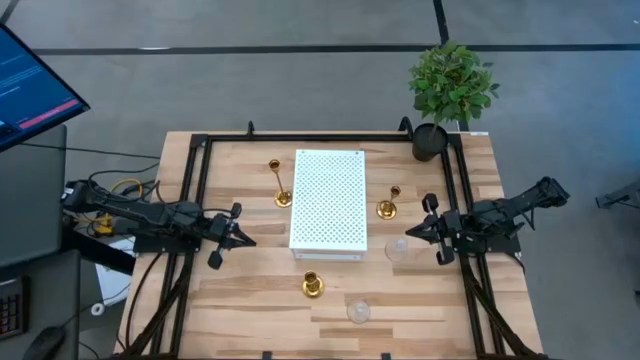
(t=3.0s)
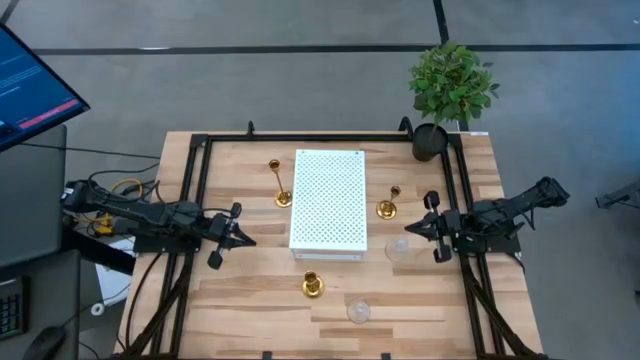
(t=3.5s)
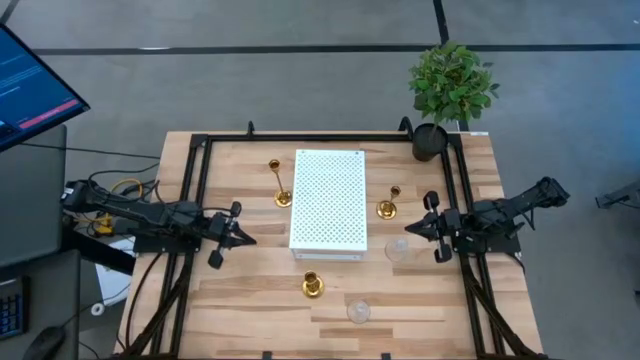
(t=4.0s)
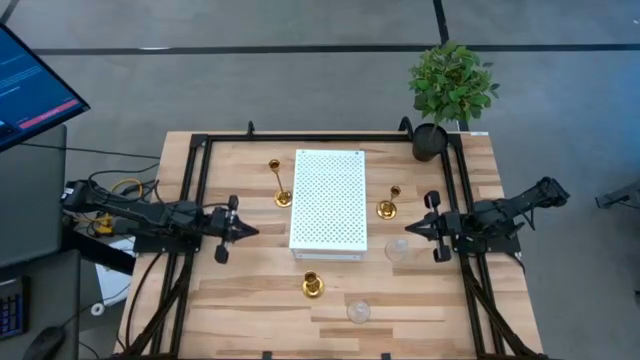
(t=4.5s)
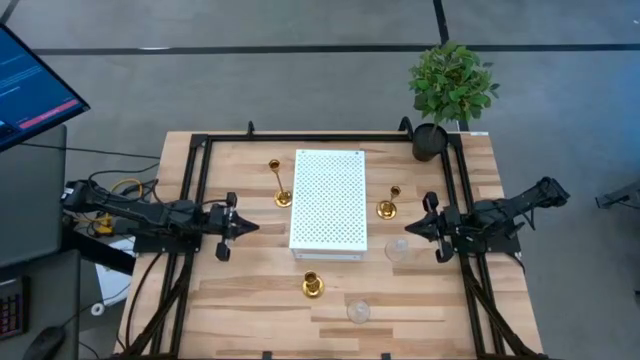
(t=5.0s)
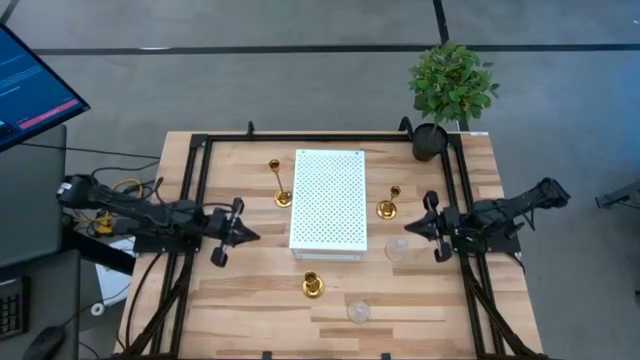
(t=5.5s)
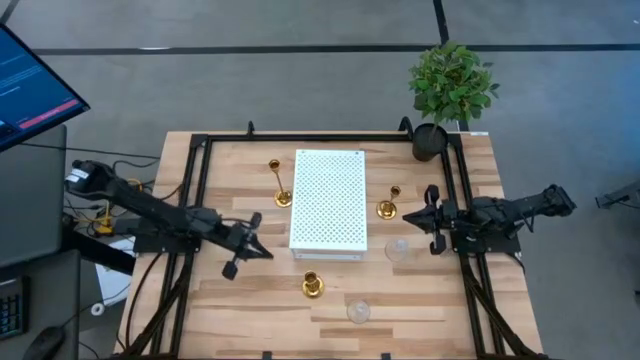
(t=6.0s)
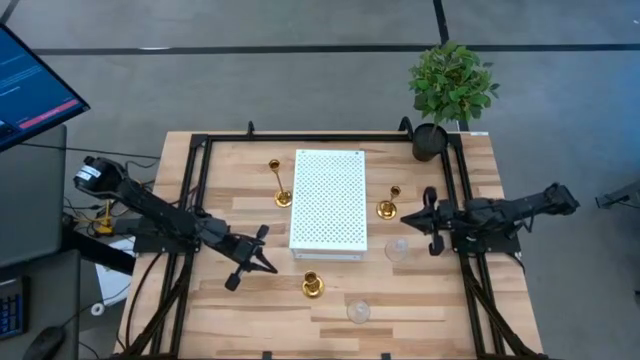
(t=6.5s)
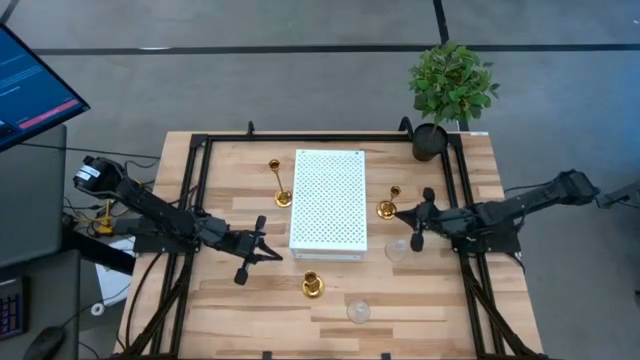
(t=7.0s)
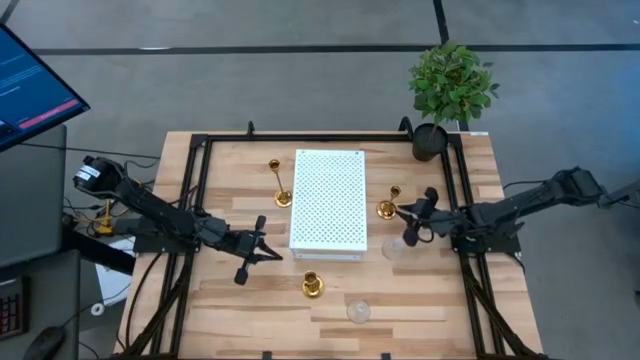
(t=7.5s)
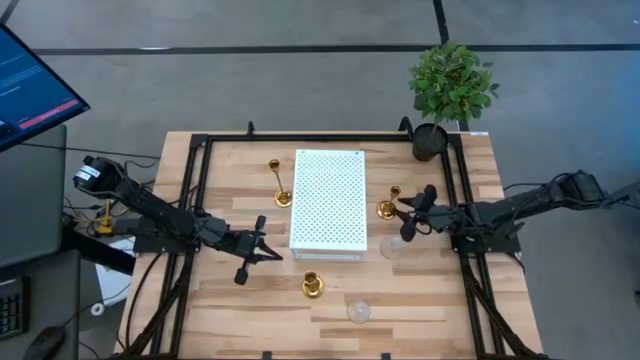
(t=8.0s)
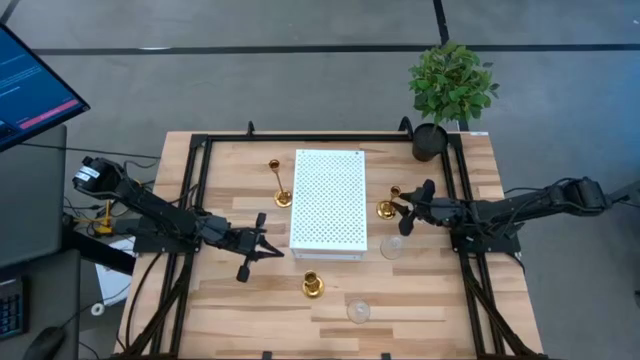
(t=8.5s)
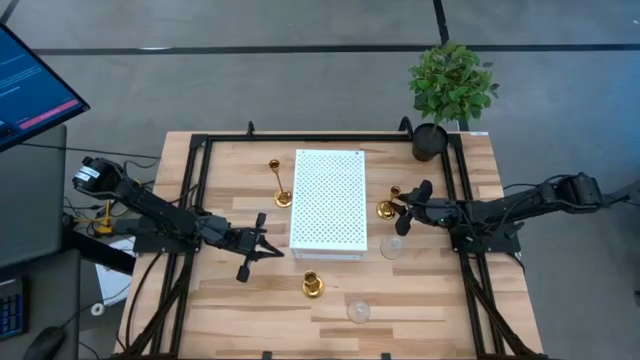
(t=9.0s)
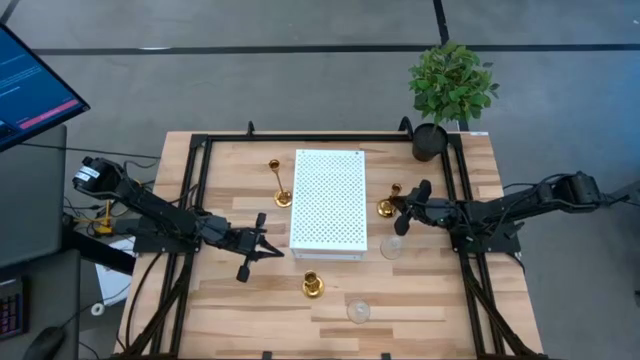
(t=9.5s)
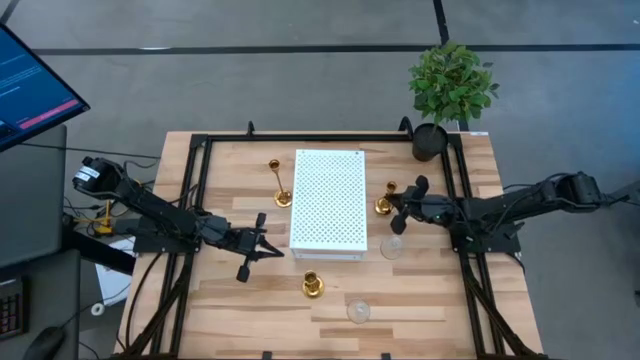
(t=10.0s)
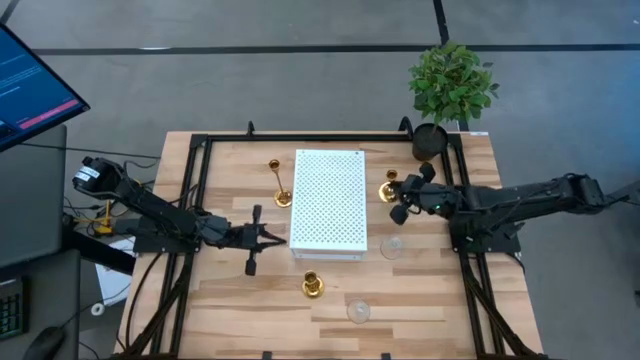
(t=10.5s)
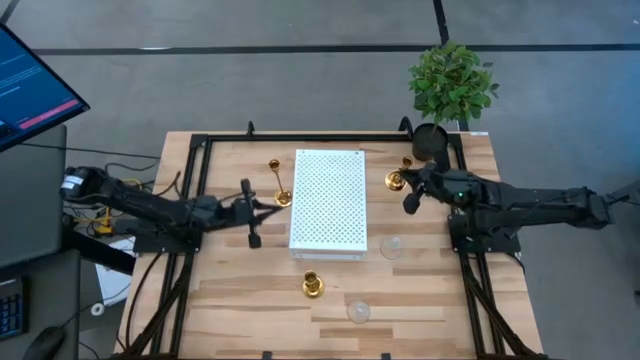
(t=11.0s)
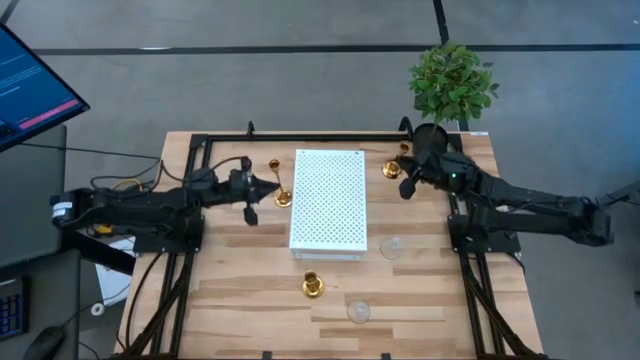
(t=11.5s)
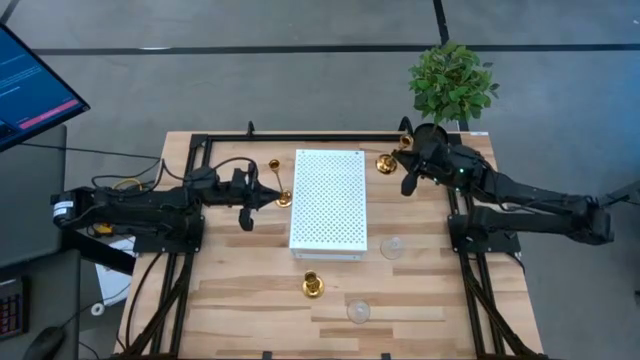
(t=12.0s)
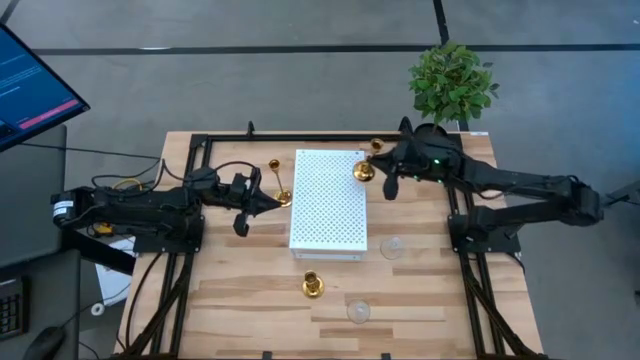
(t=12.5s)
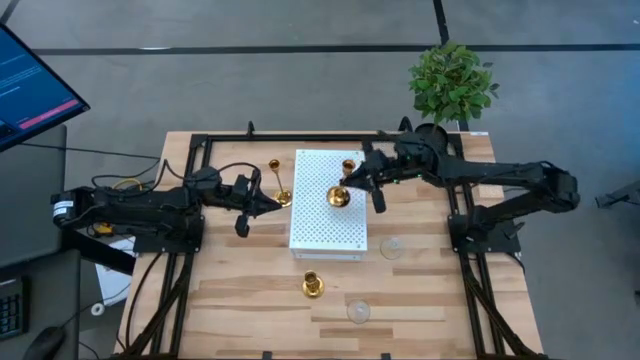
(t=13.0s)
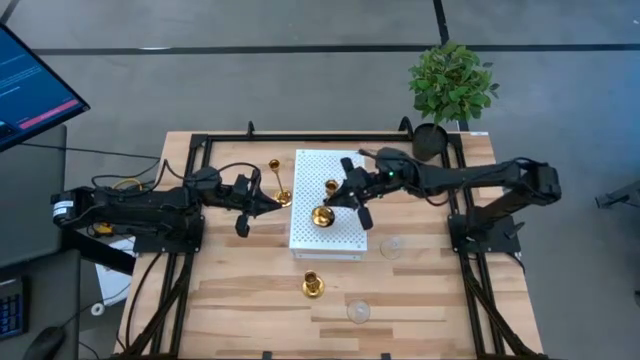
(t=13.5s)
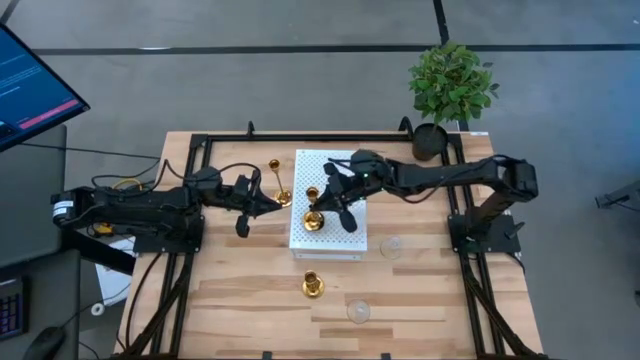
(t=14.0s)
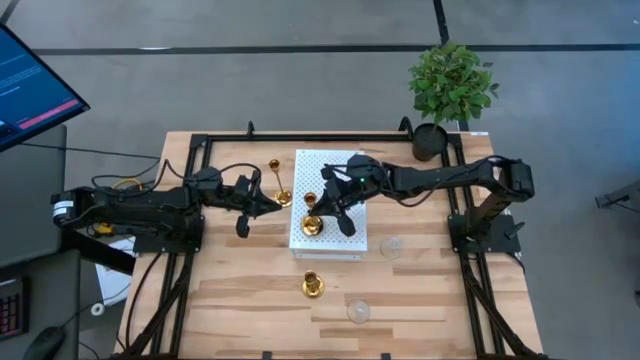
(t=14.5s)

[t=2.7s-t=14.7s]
Task: Pick & Place candle stick holders
Put the top right gold candle holder on the shelf

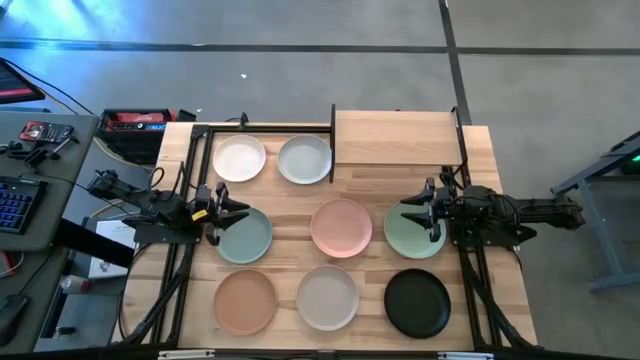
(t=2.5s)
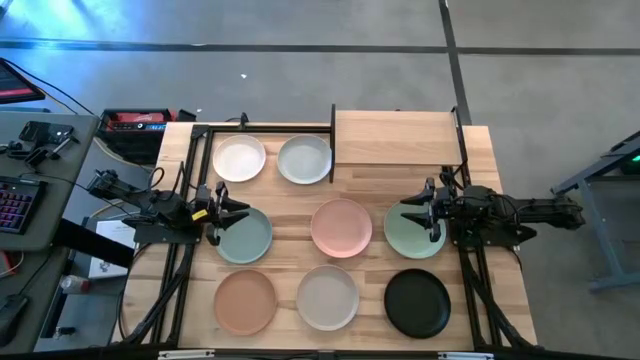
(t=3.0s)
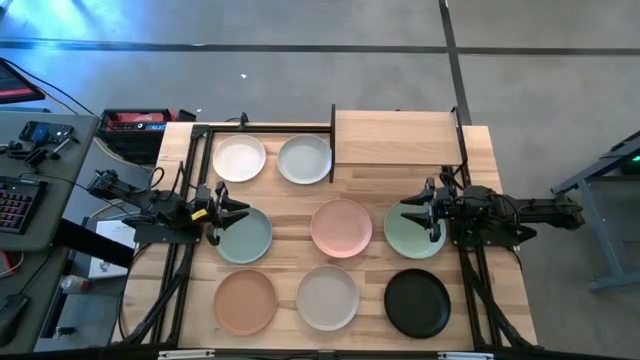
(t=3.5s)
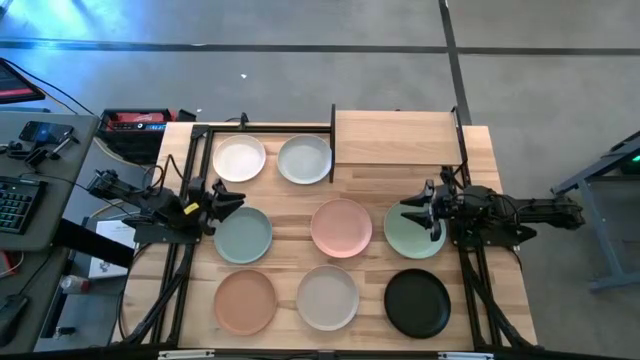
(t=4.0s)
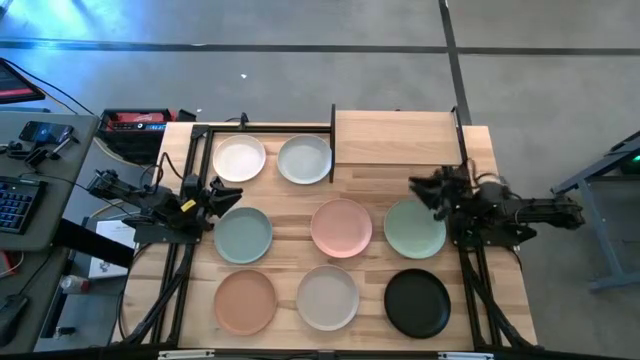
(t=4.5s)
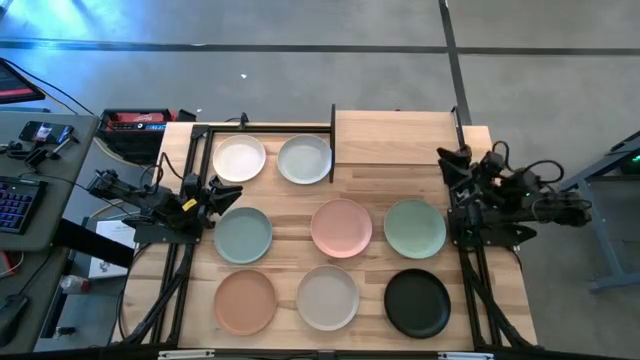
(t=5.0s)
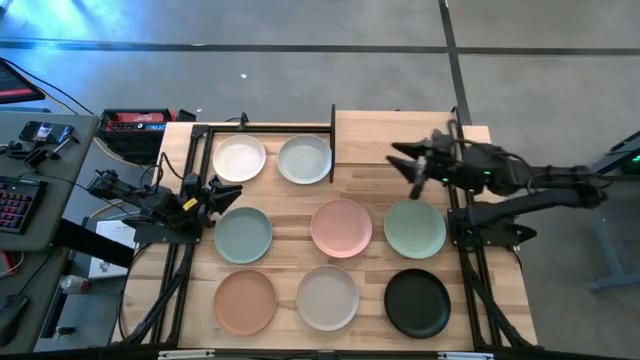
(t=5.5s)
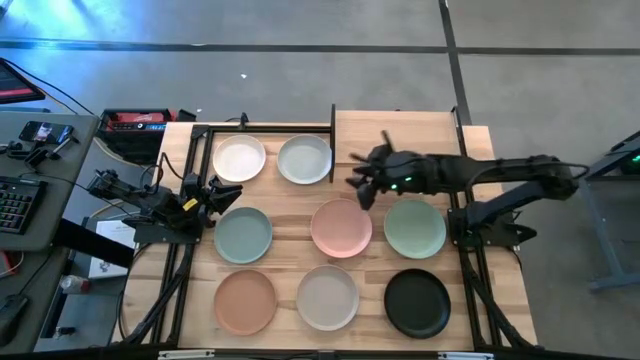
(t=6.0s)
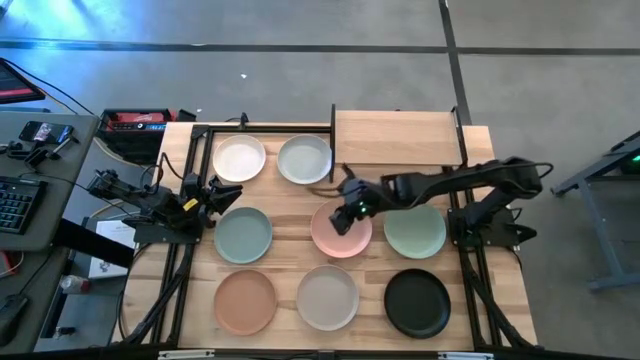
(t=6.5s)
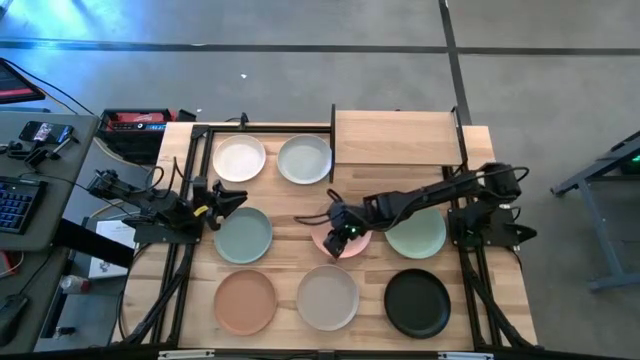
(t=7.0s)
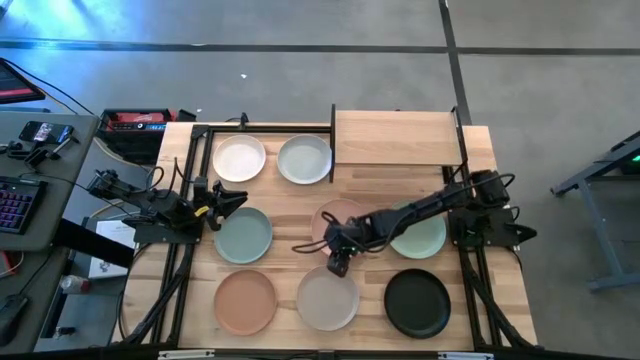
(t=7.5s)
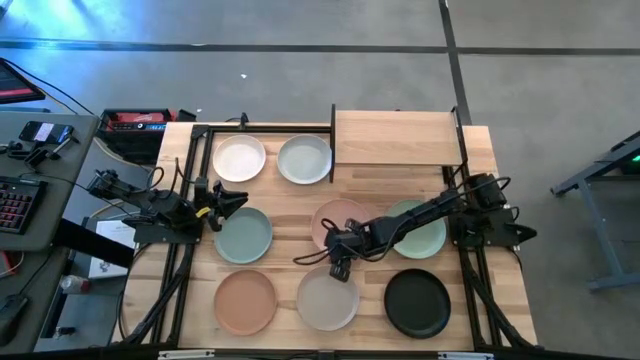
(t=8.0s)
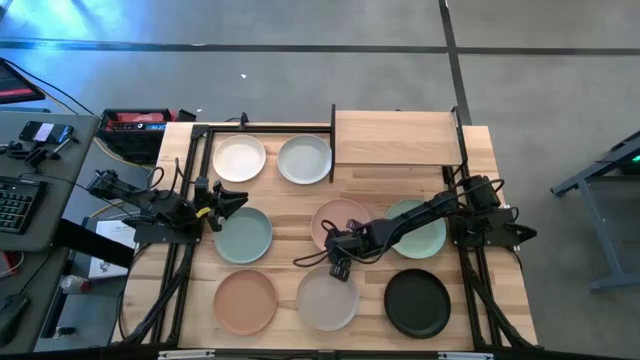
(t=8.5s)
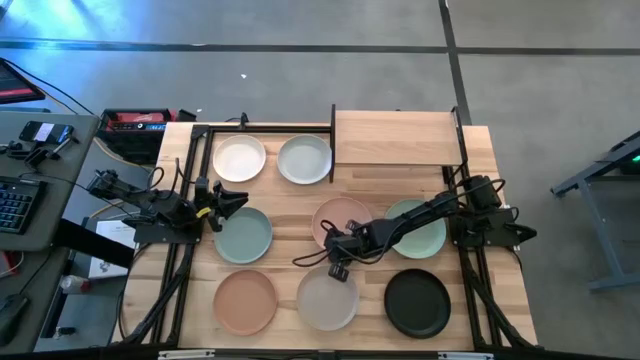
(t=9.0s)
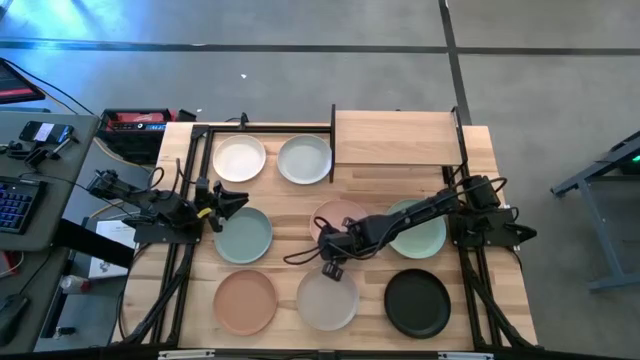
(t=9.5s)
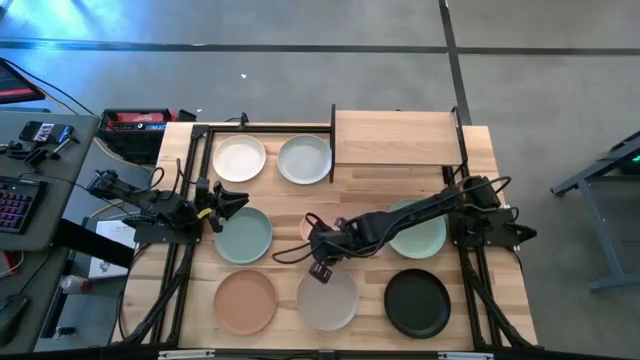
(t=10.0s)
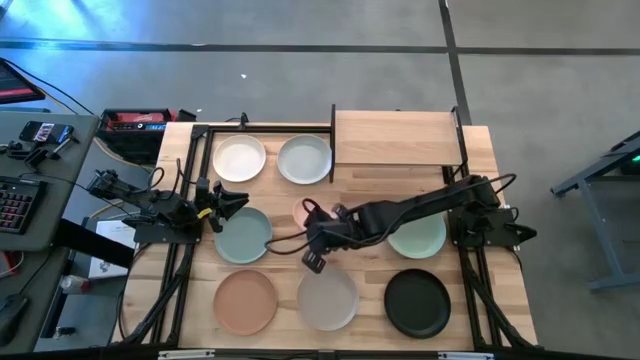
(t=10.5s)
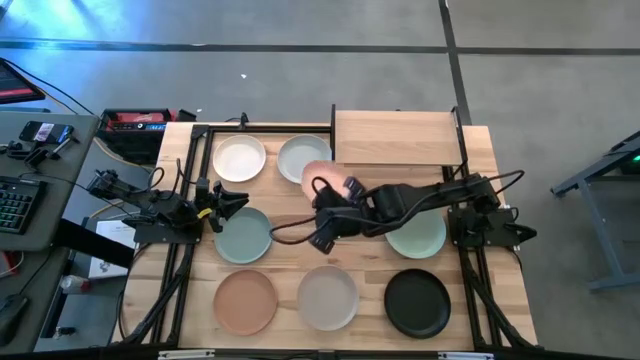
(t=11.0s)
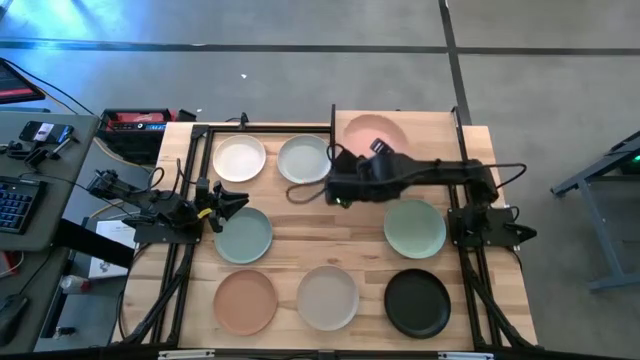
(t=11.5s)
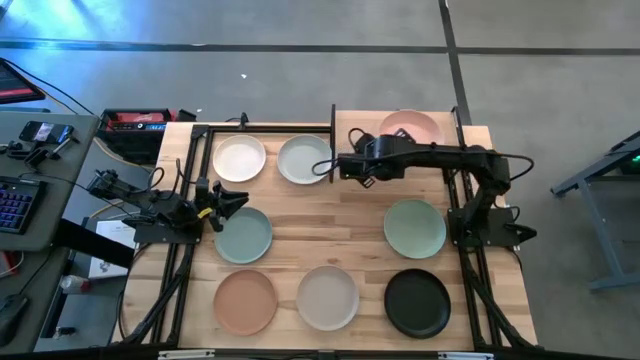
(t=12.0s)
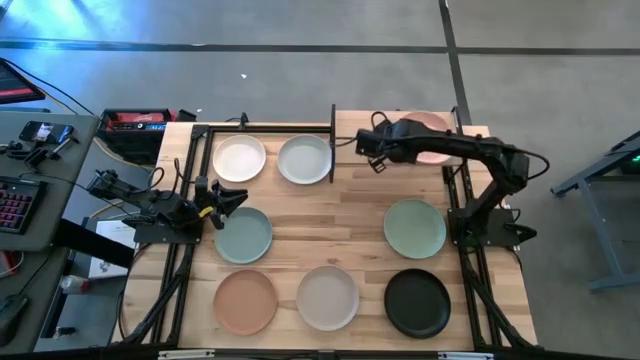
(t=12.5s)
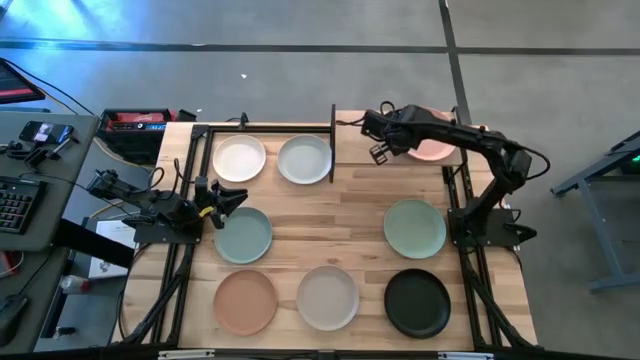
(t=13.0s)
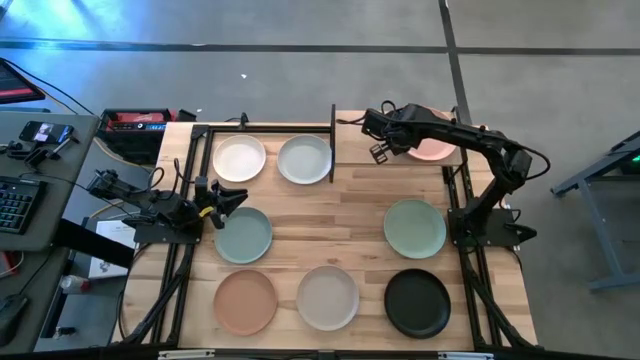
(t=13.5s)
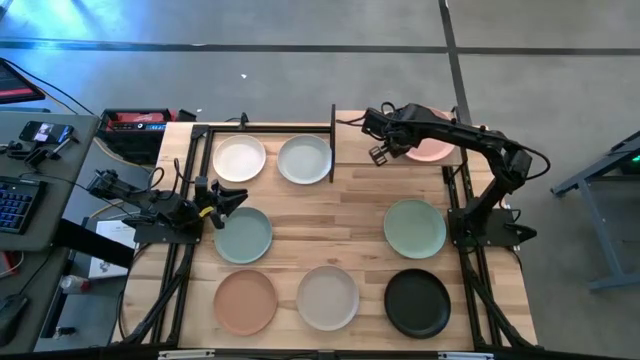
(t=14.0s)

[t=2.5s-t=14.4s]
Task: Place and stack plates onto a shelf
Put the light orange plate on the shelf
